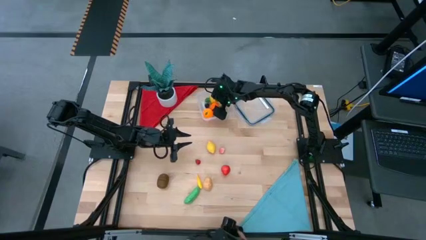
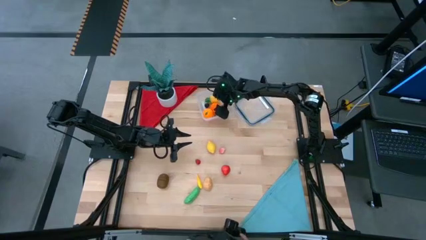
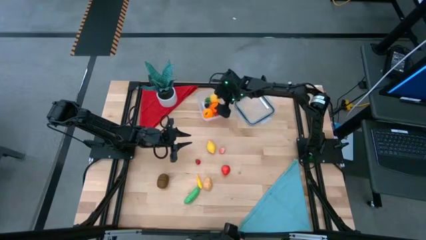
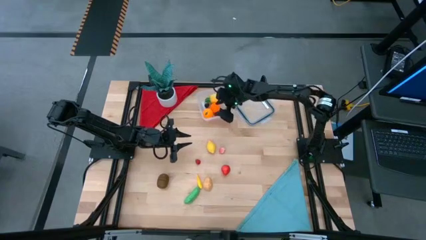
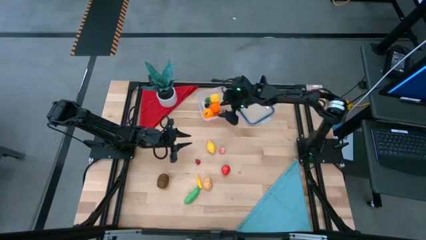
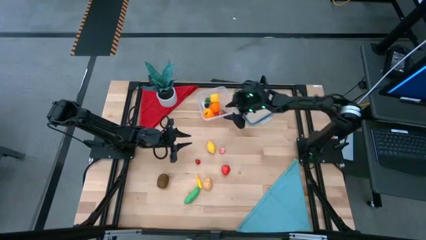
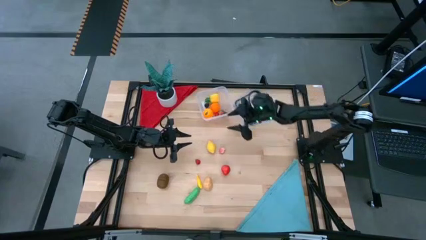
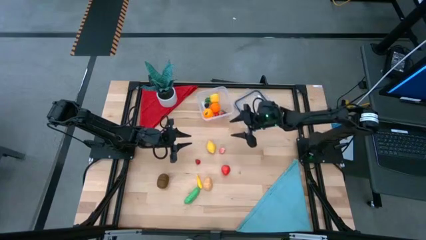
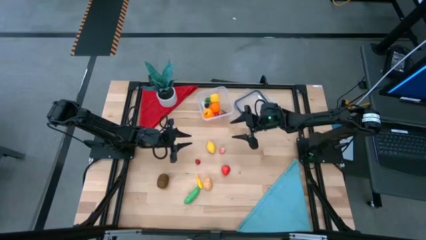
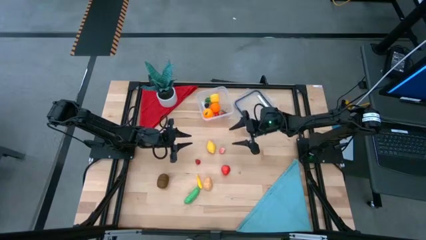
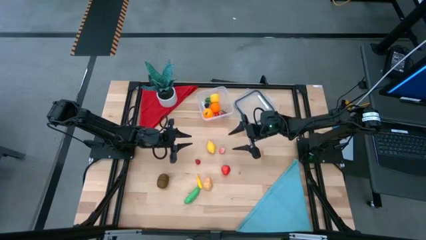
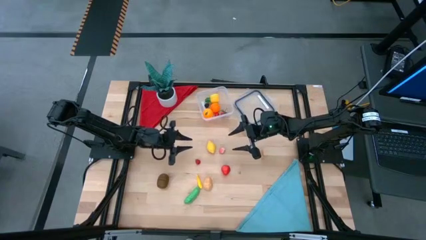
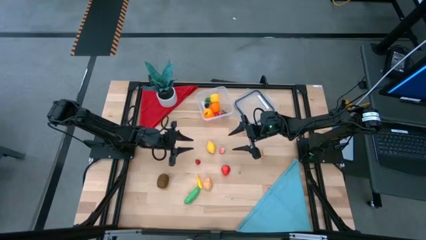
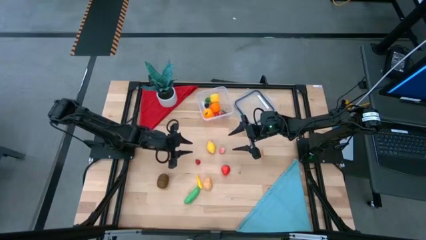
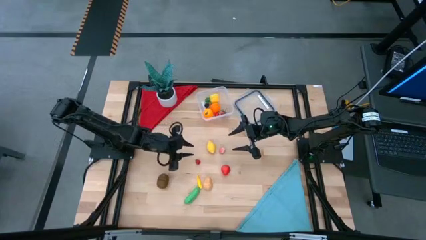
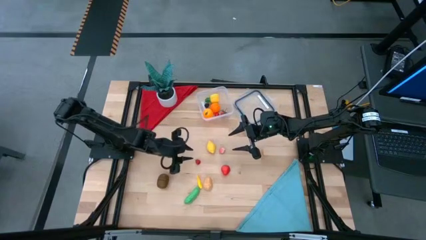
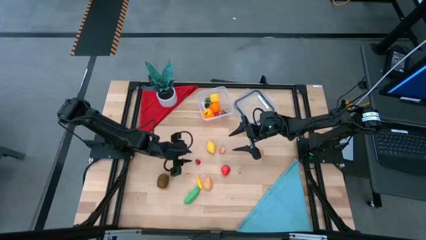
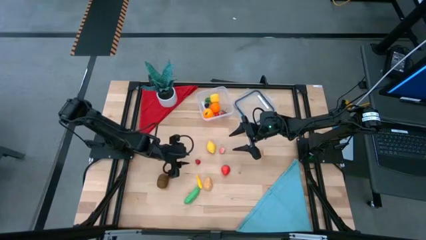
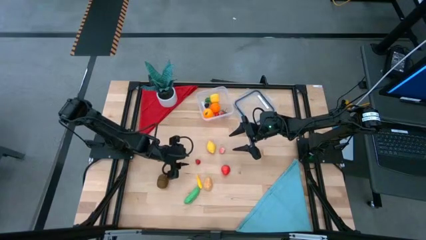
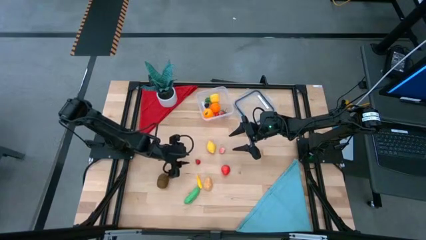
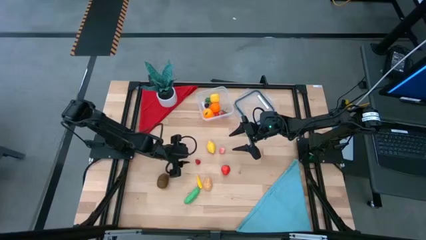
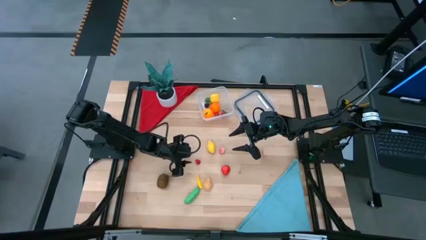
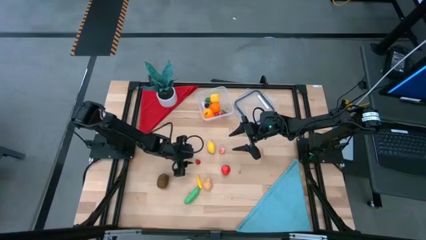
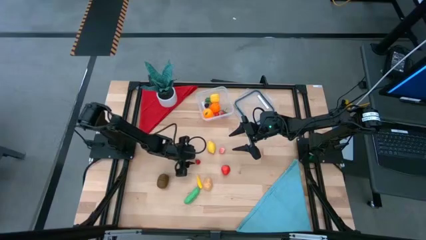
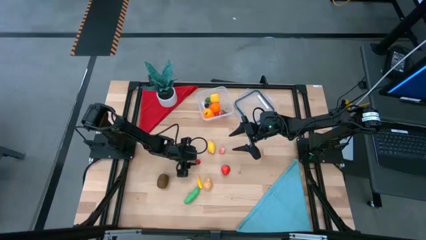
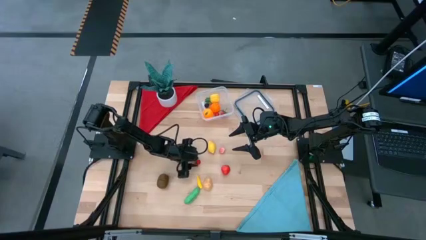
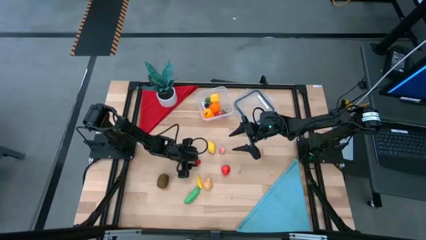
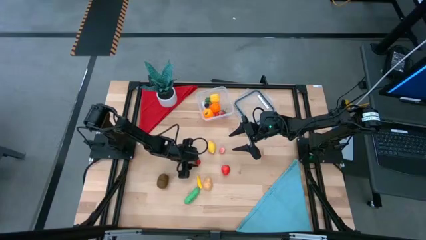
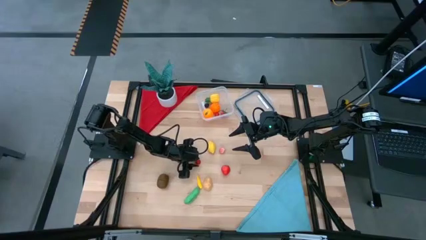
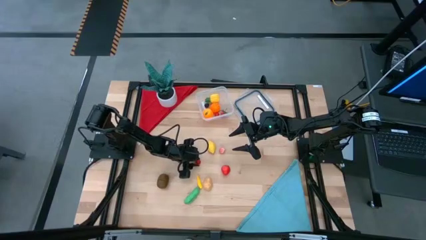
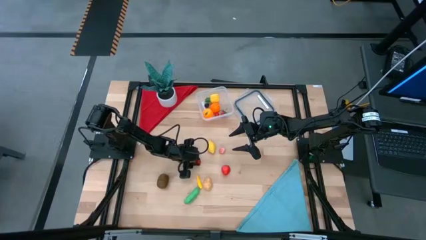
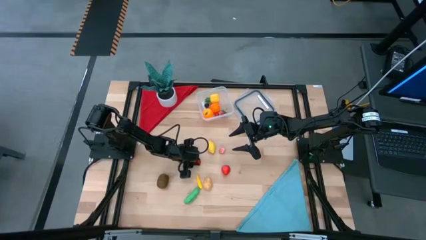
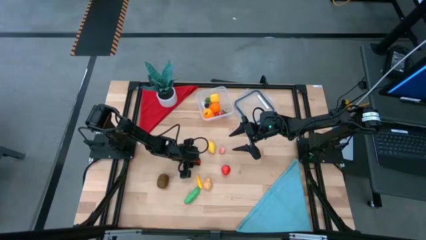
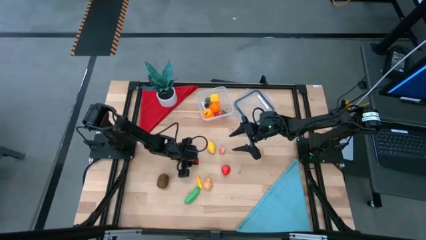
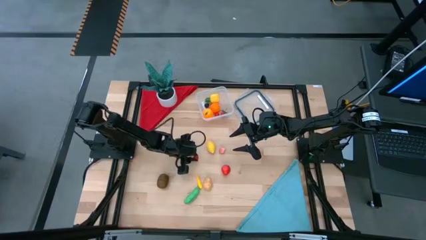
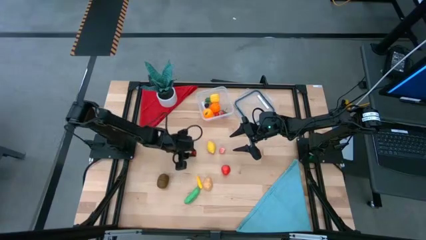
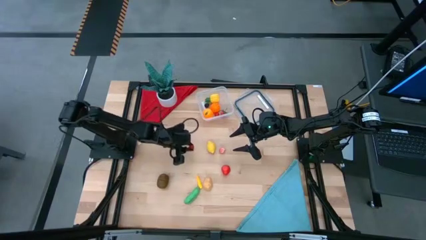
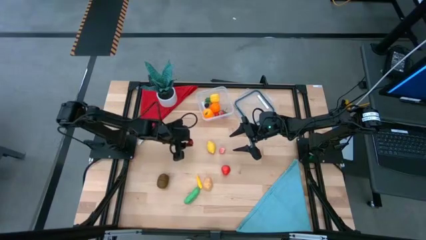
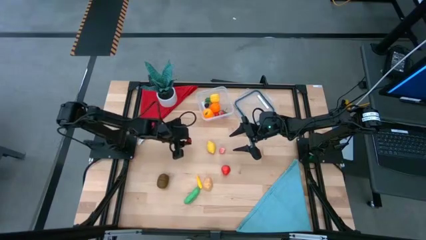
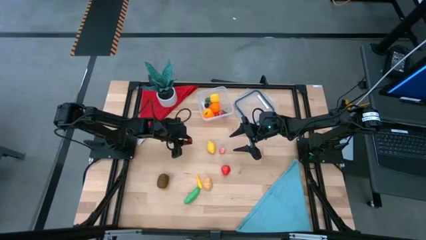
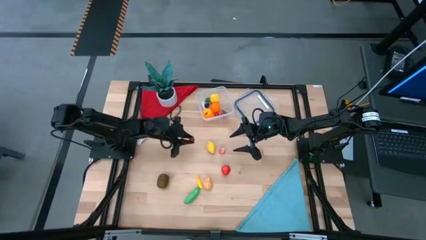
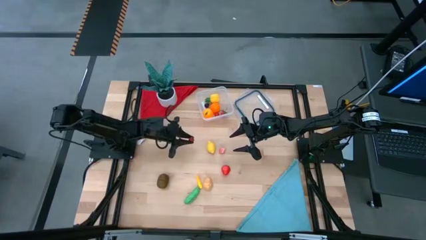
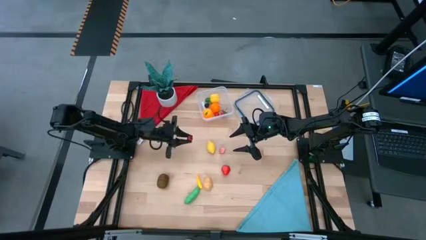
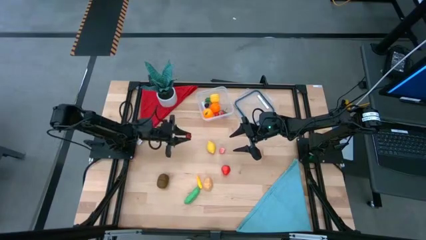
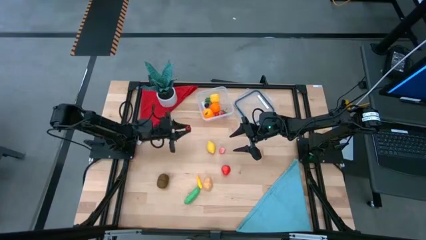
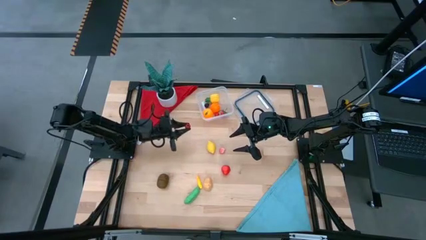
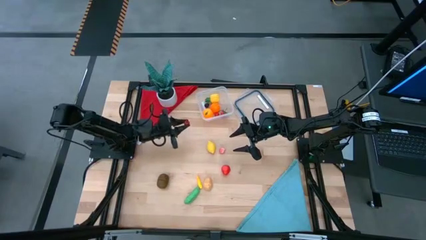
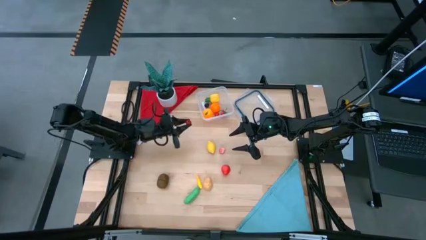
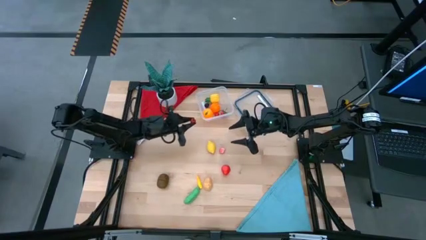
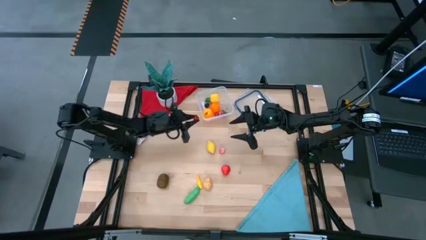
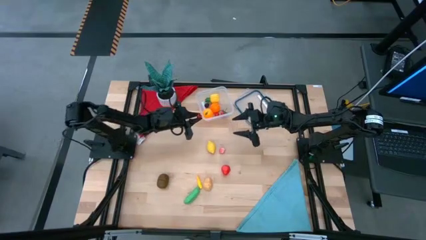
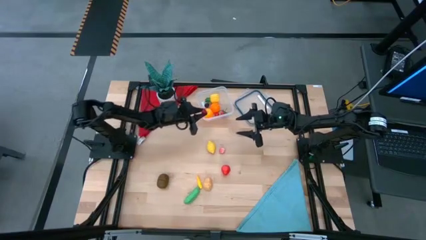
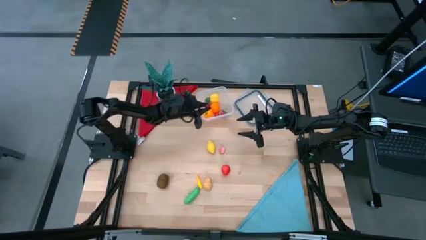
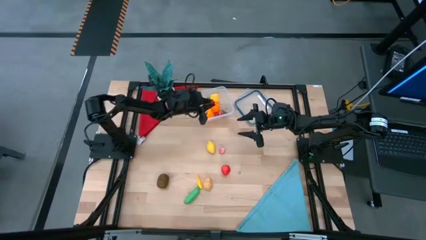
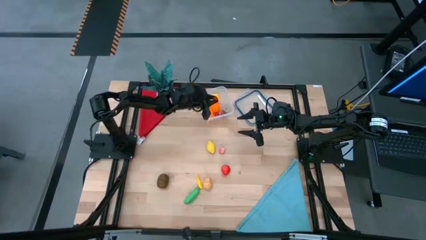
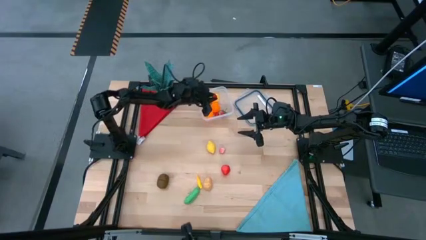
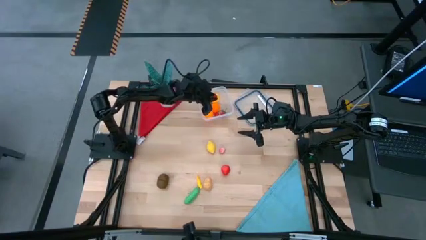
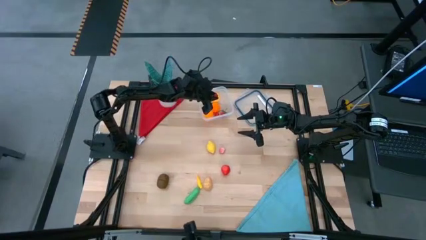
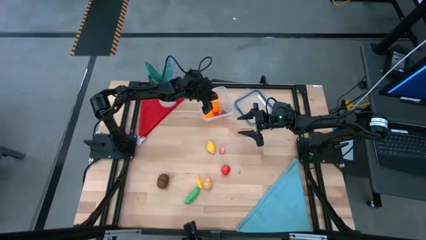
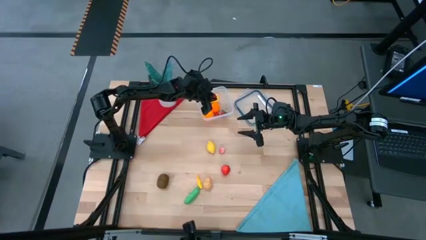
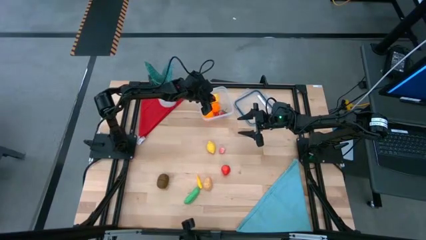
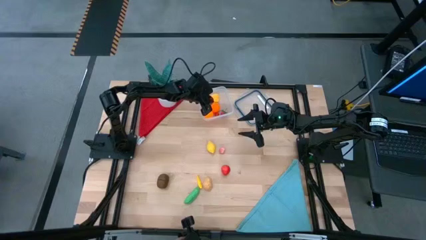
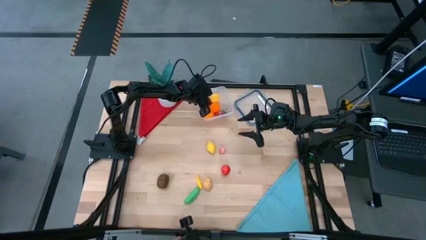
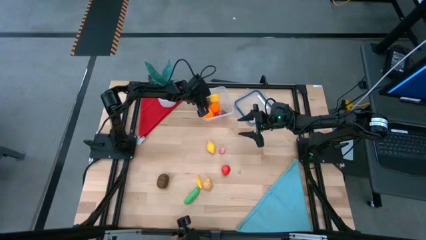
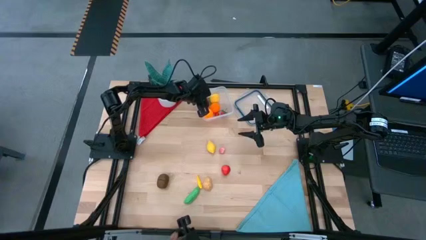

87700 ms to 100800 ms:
Task: Pick and placing Produce into tupperware
Put the red raspberry into the transparent container

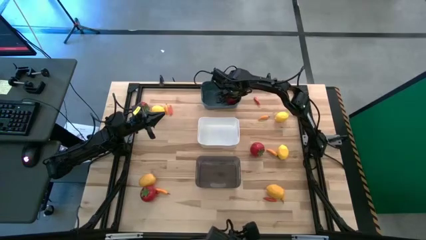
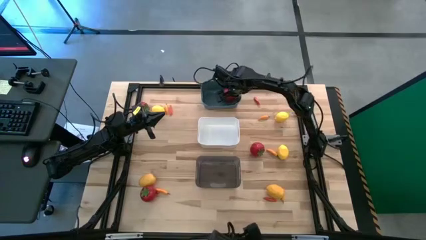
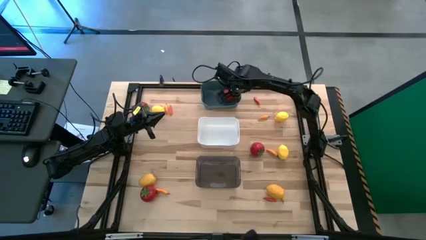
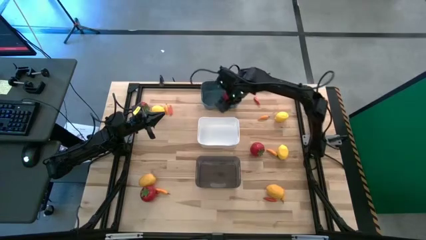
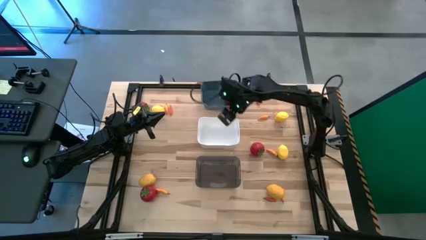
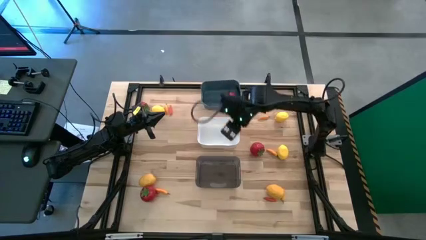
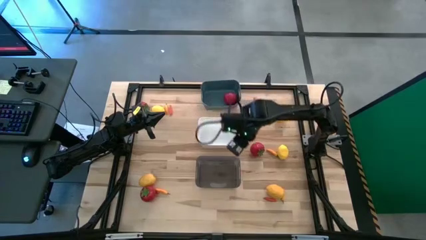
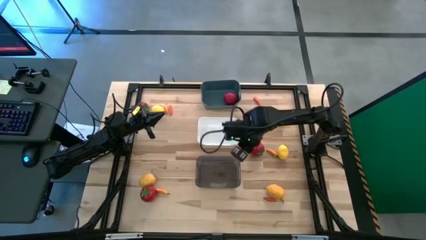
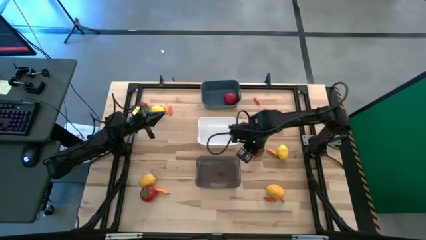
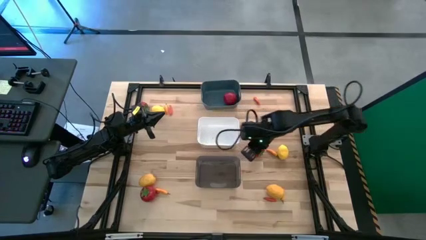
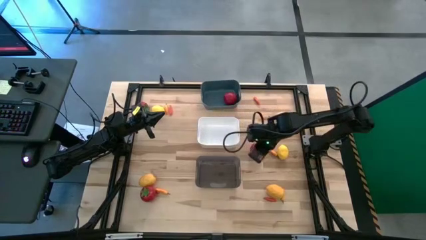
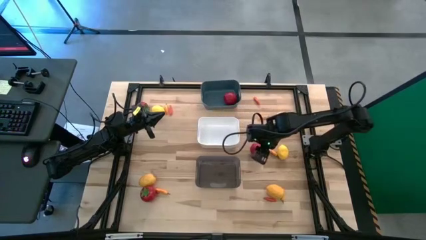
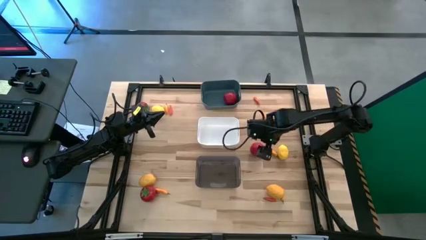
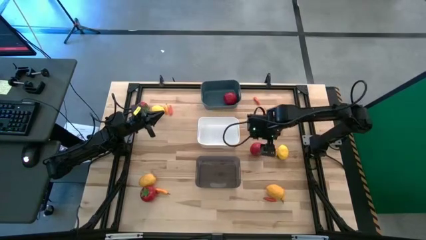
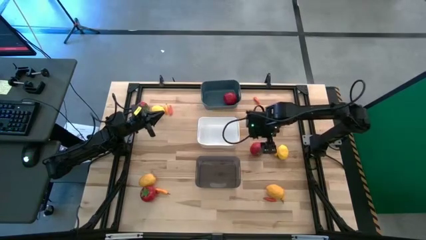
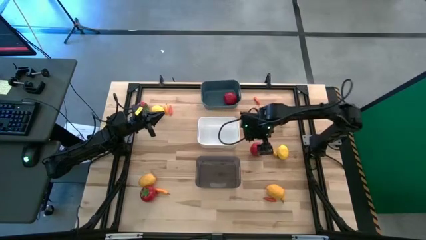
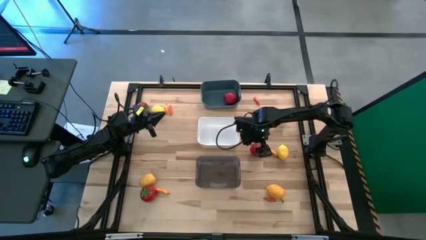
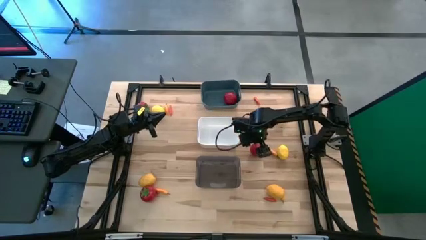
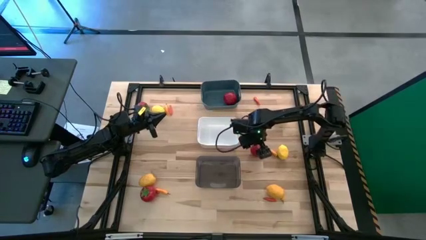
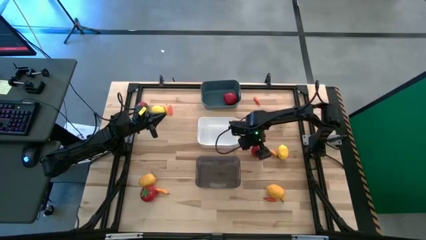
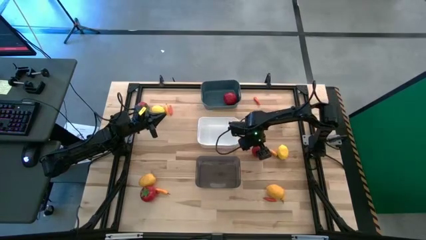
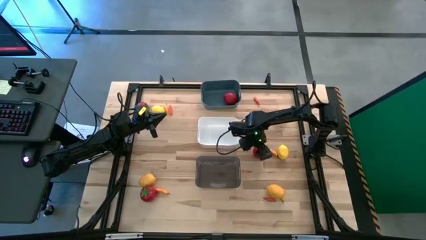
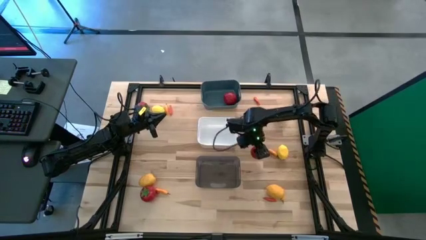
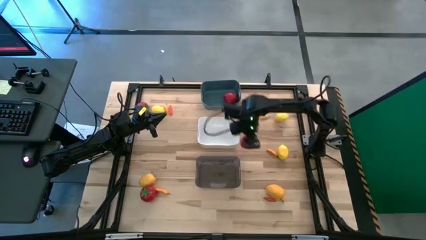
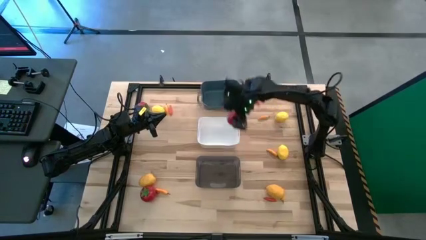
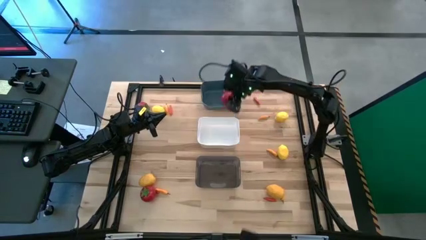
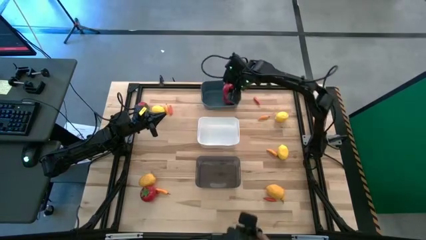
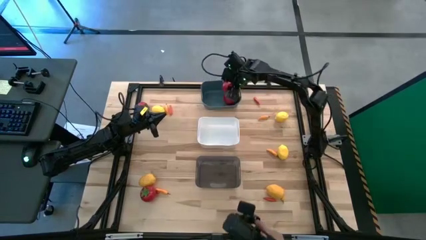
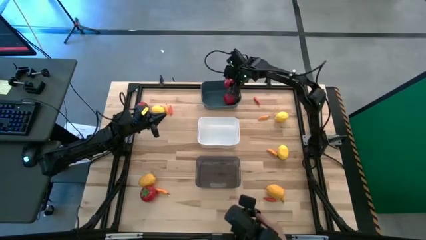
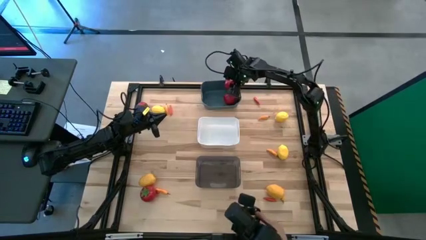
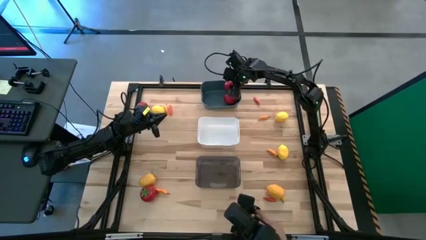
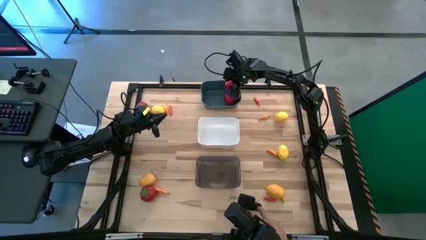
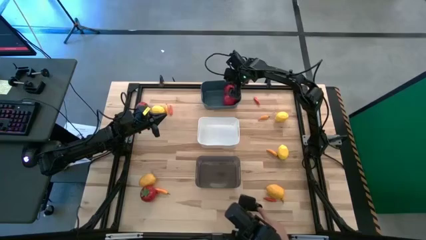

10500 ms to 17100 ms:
Task: Sort produce into baskets
Put the red tomato into the blue bin
